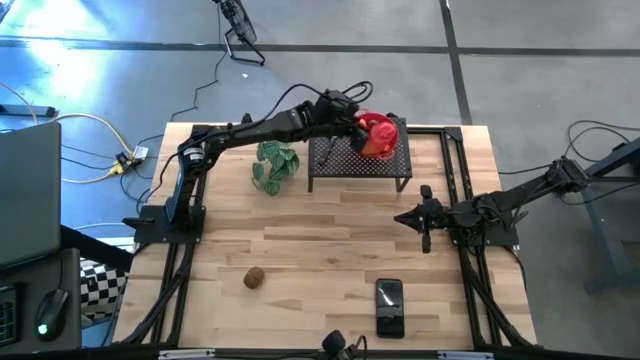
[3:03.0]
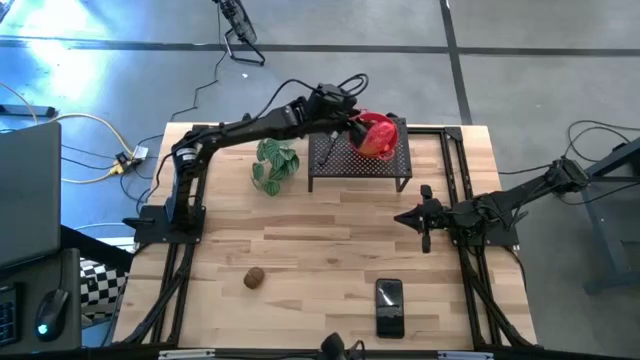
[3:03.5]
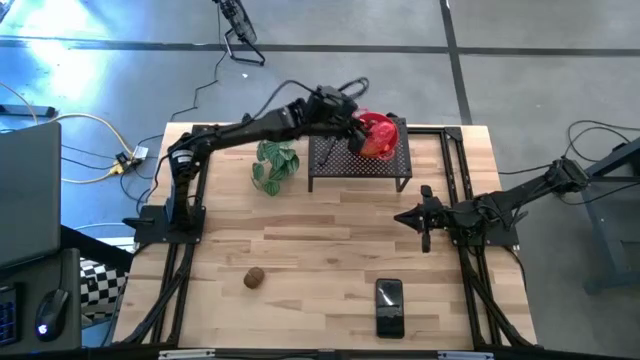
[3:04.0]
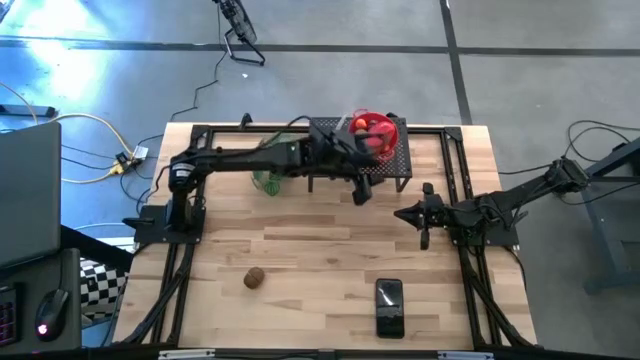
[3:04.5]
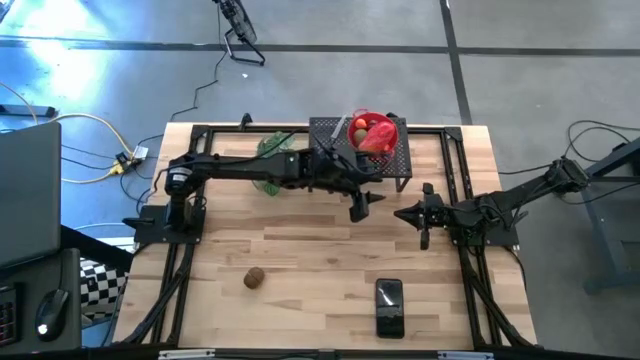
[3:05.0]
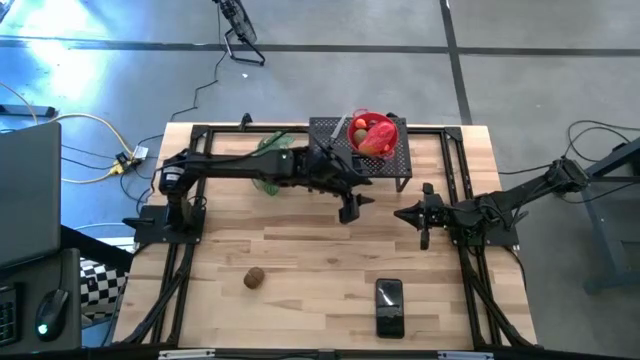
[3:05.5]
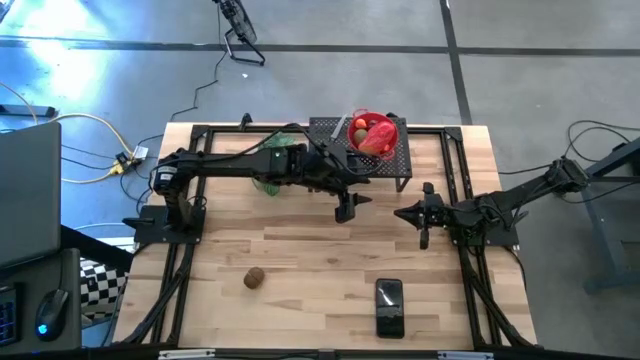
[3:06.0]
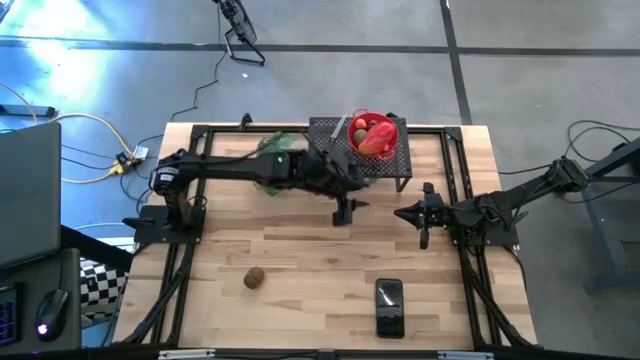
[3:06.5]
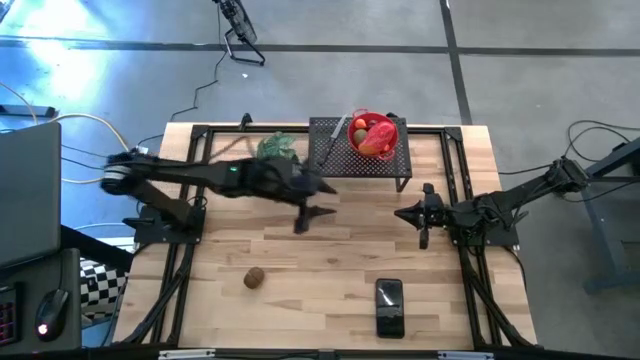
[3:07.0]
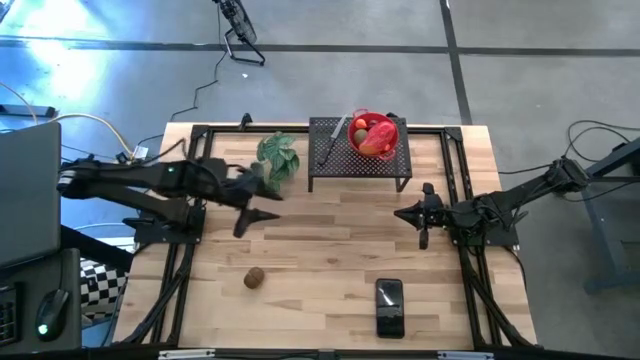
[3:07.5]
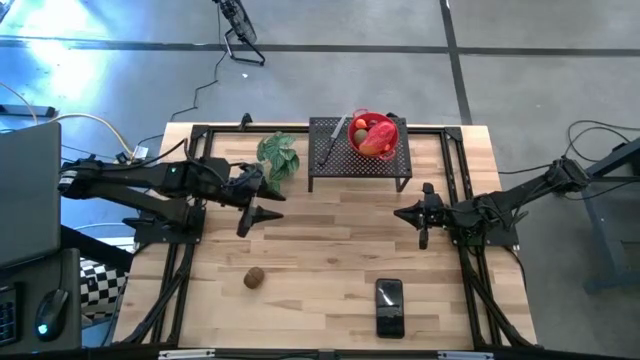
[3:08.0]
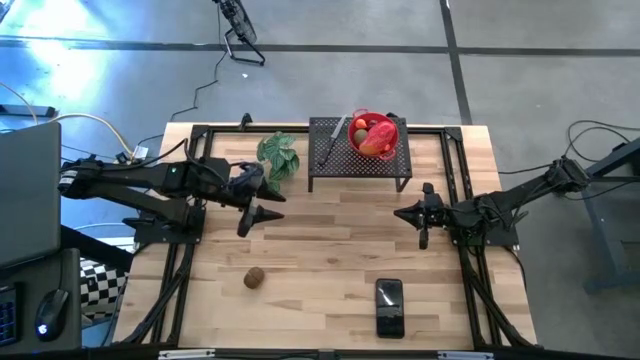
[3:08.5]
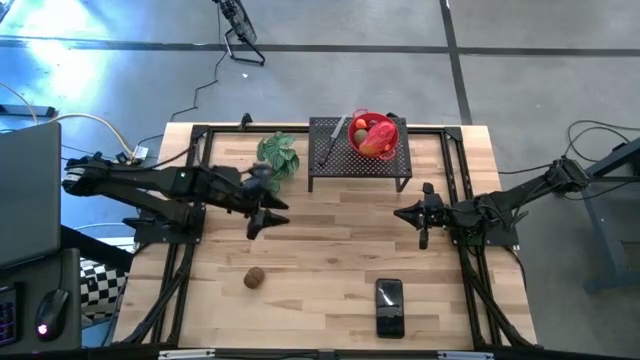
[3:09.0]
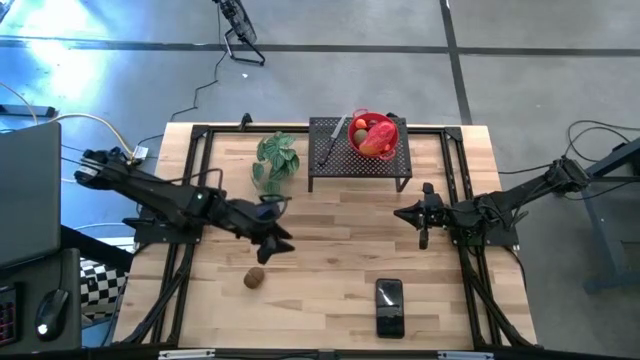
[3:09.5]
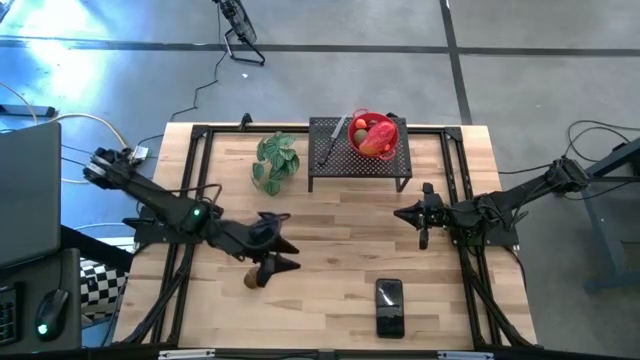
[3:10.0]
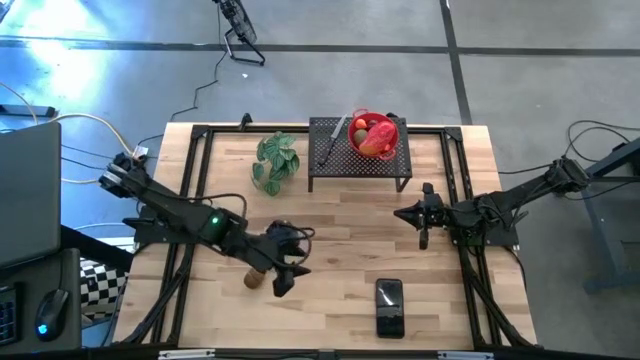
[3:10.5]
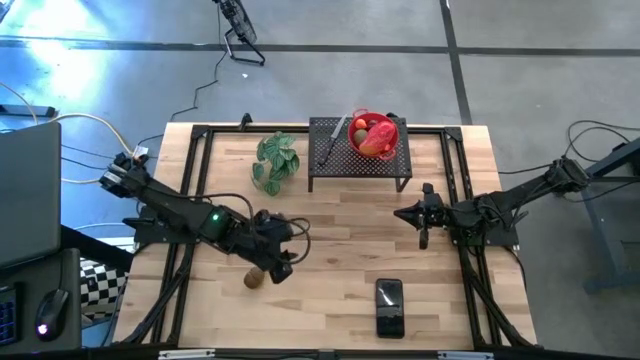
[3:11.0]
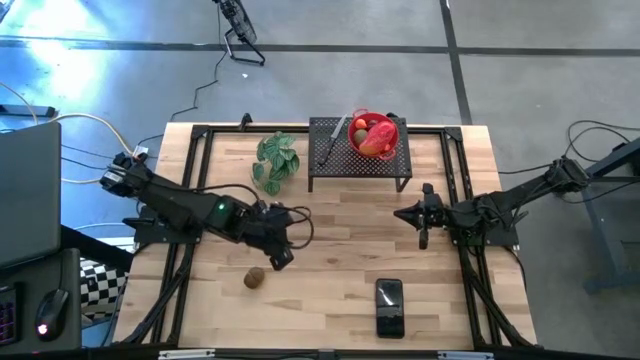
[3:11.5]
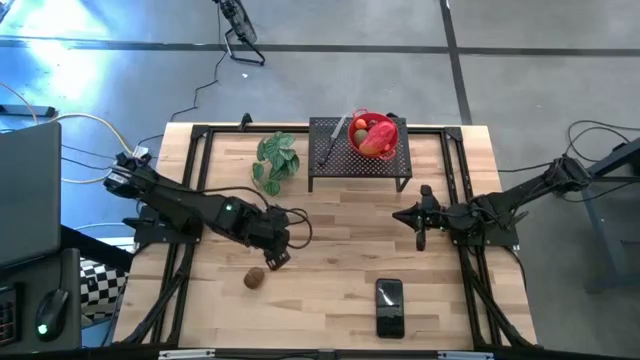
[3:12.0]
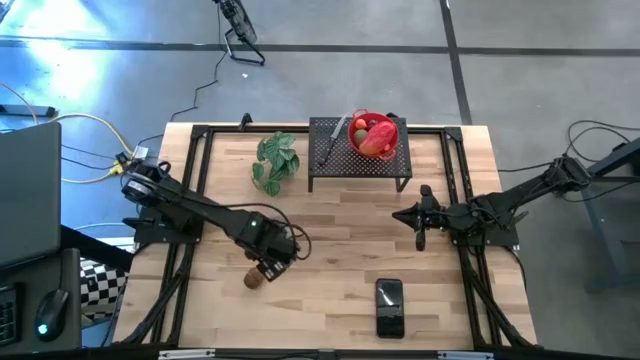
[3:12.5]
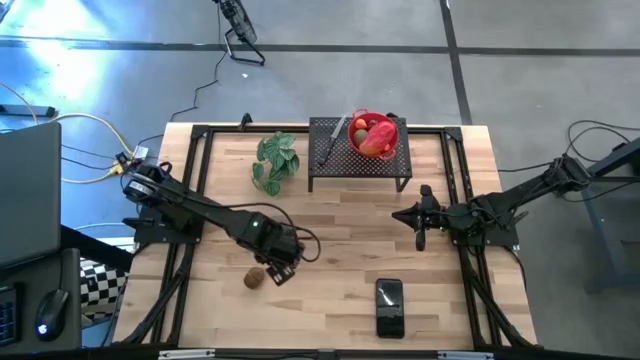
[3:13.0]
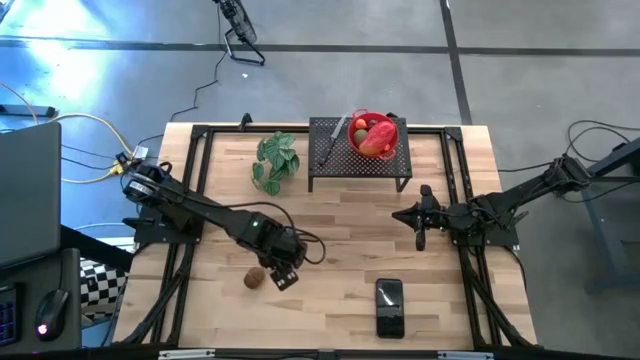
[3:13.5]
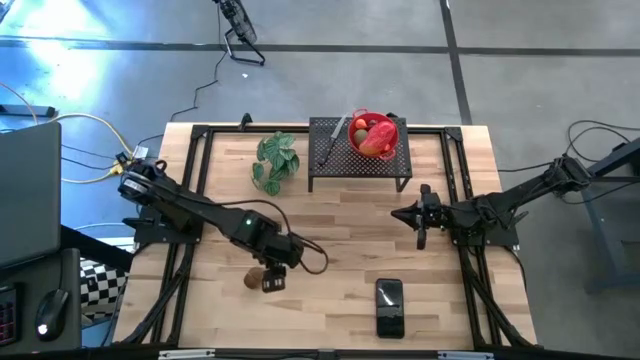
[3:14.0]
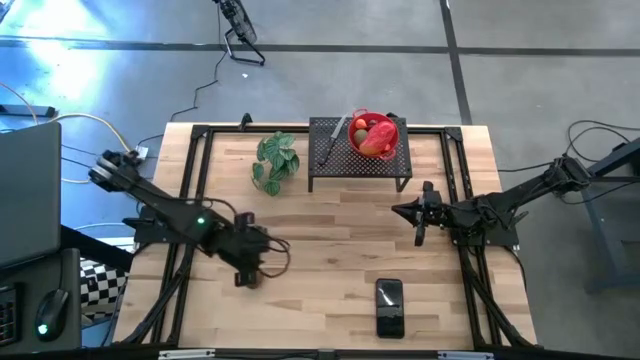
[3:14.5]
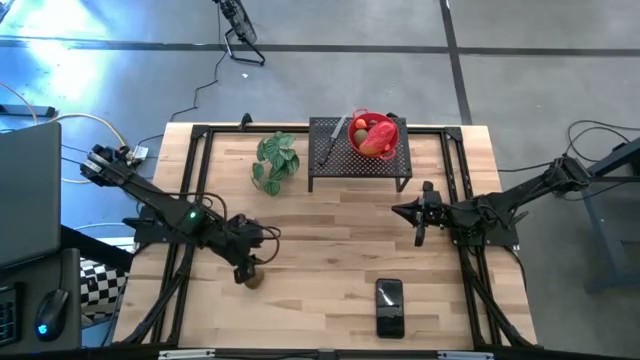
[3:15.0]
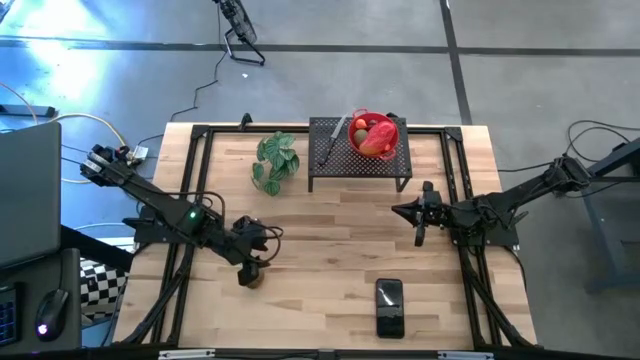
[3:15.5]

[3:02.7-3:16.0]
Task: Pick & Place Fruit
Put the brown kiwi into the red strainer bowl on the shelf

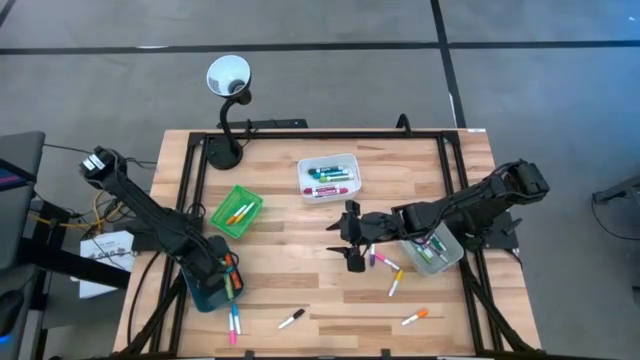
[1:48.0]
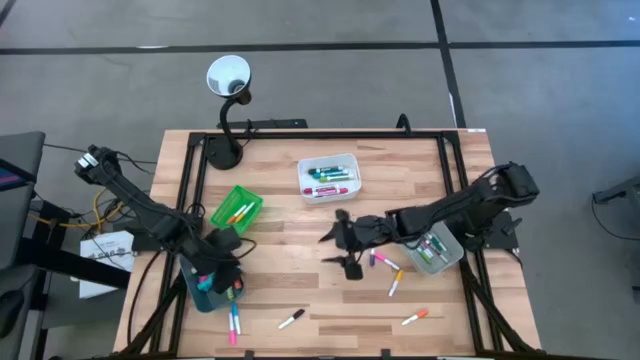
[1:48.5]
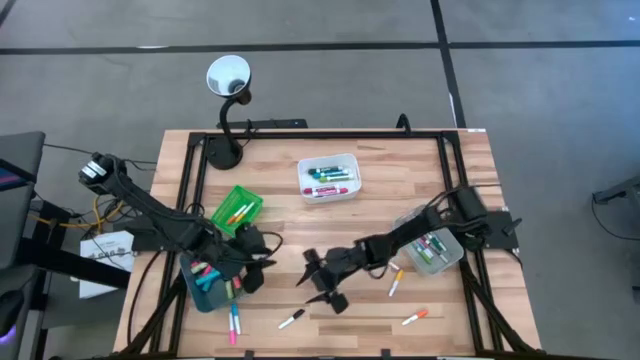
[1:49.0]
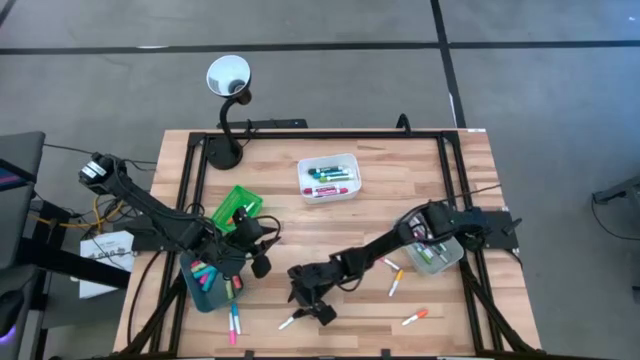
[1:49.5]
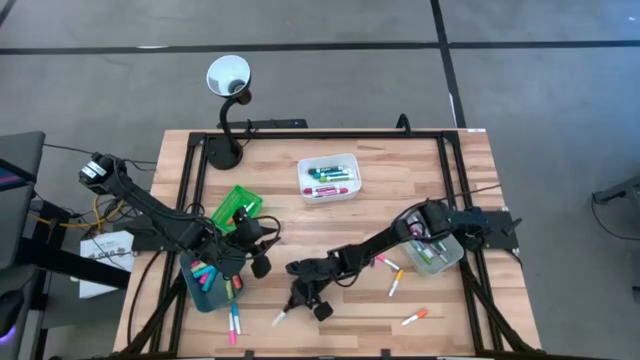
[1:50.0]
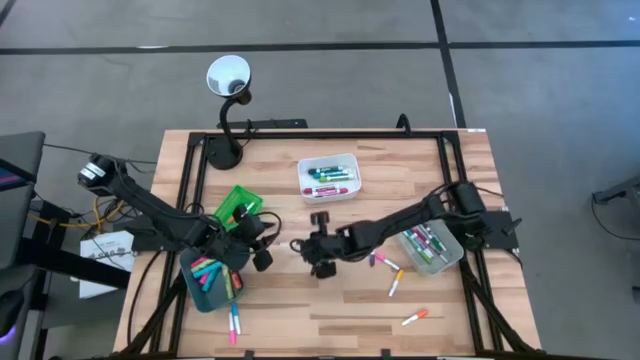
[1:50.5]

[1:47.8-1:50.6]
Task: Pick & Place Markers
Put the small black highlighter pen into the green bin

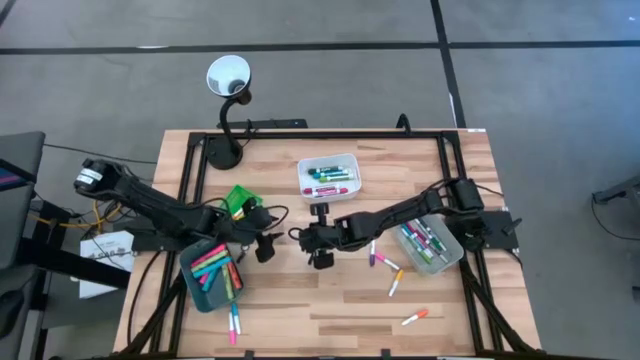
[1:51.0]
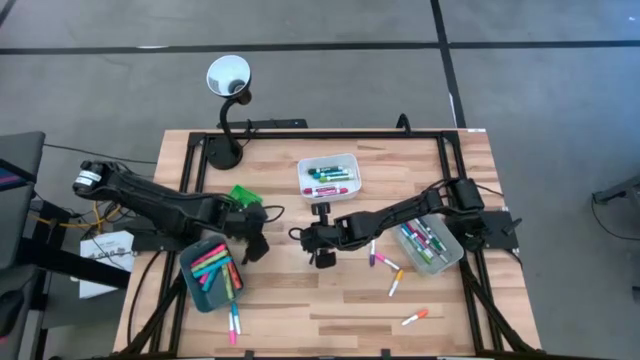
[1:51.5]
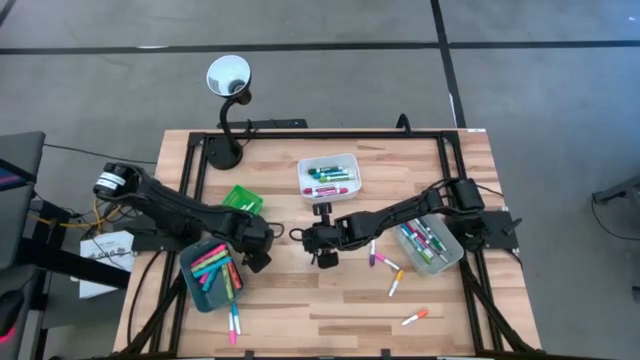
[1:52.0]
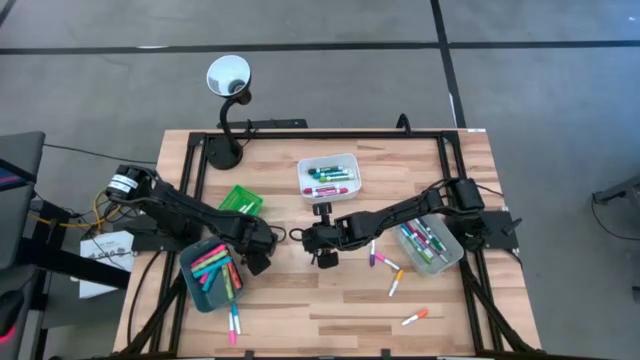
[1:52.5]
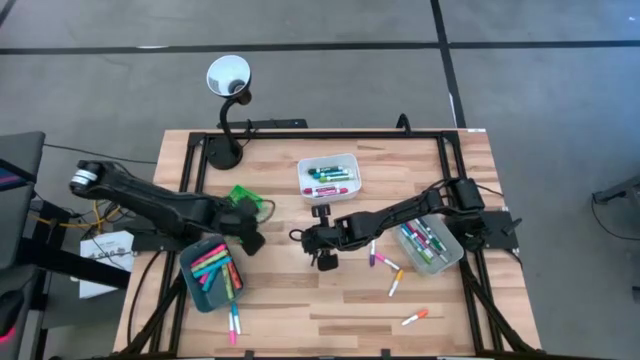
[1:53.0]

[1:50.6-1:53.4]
Put the black marker pen into the green bin
